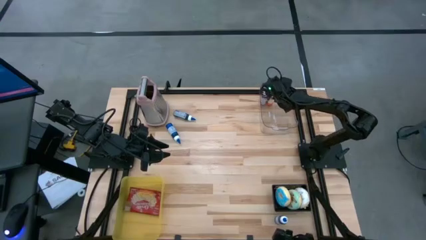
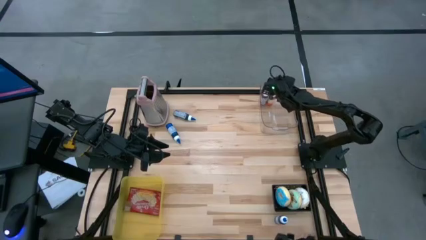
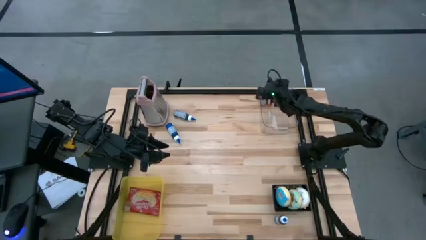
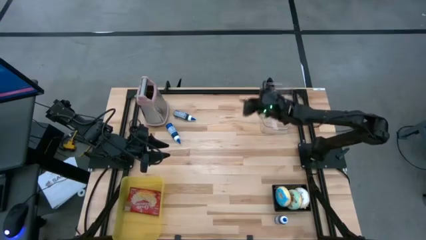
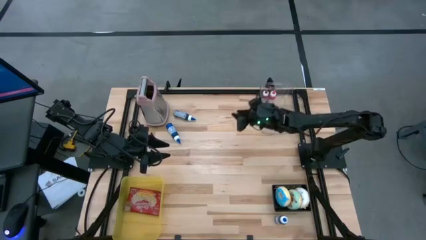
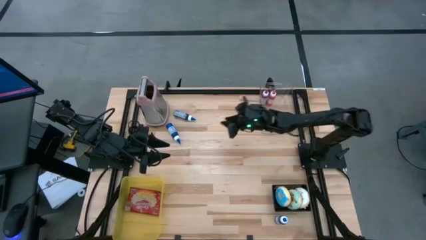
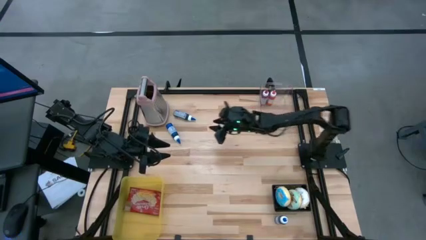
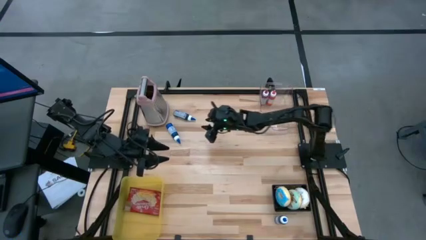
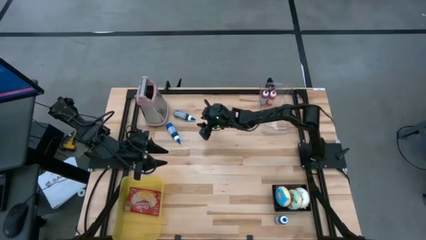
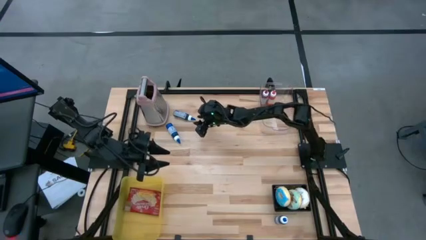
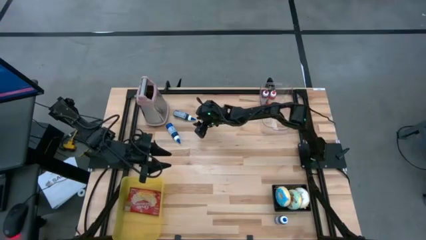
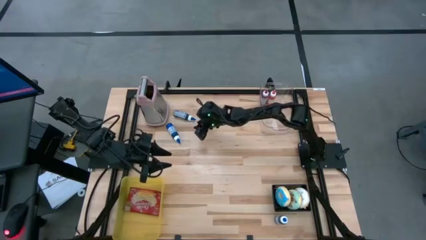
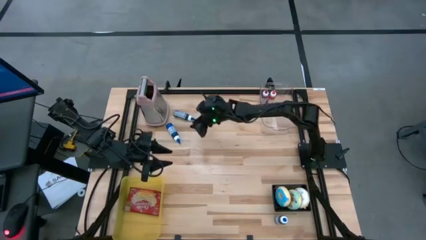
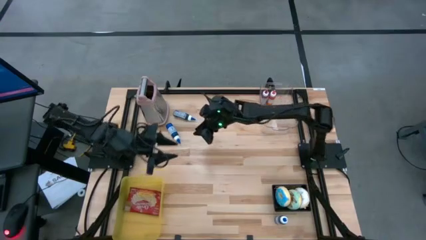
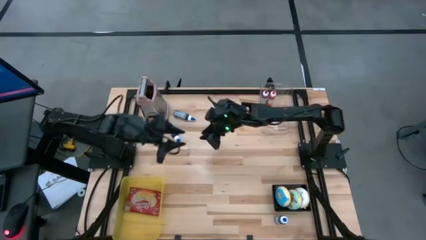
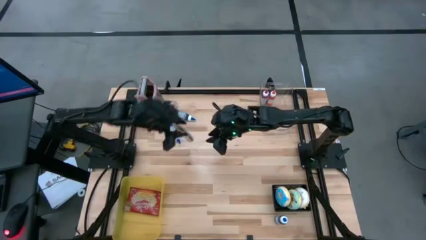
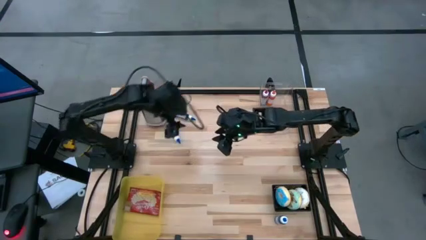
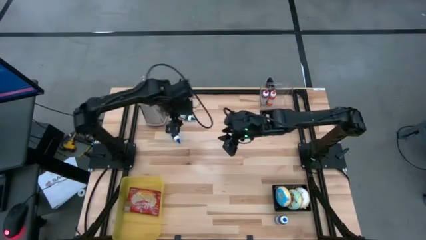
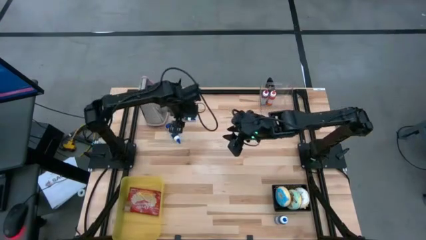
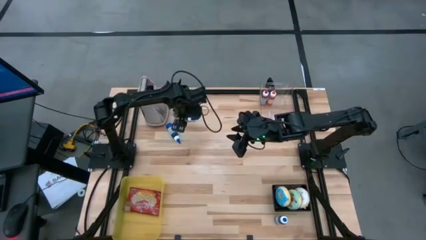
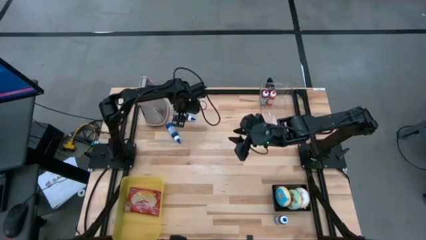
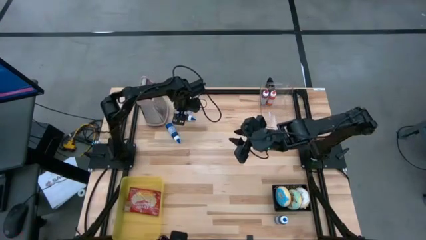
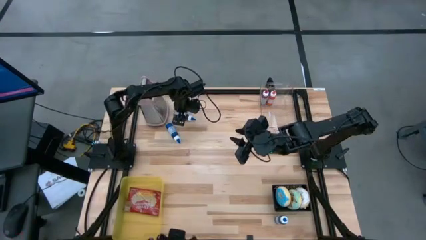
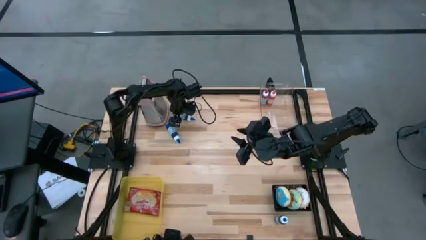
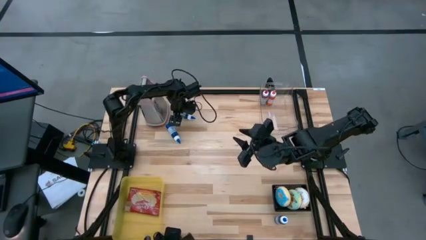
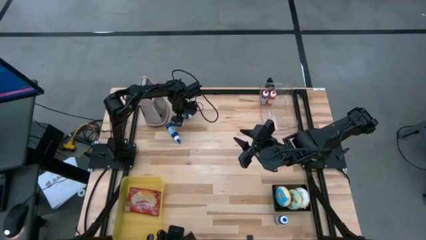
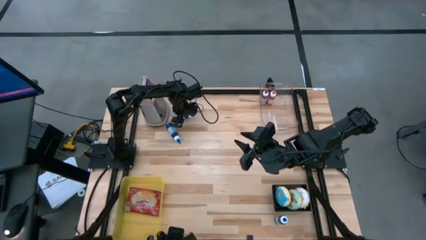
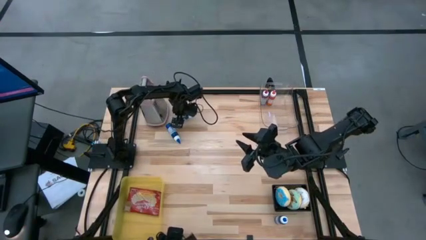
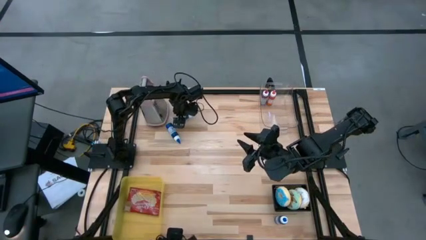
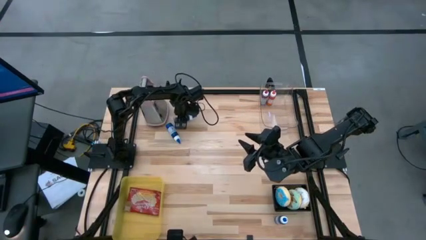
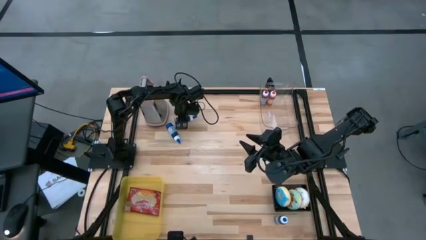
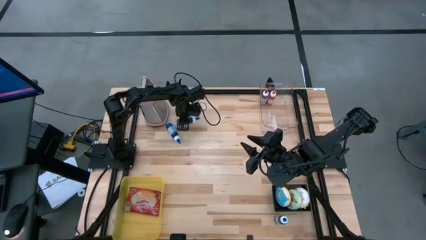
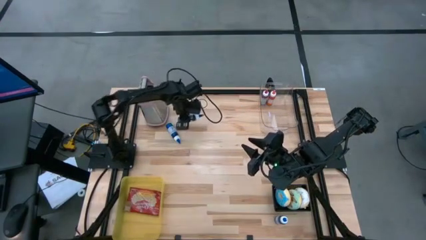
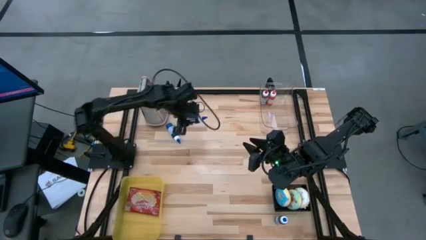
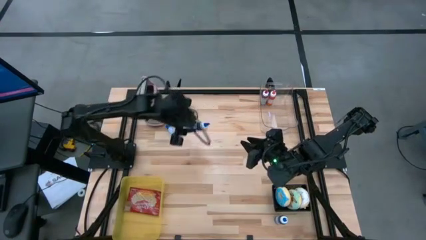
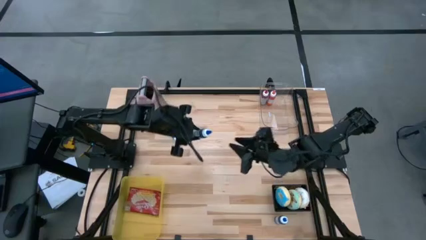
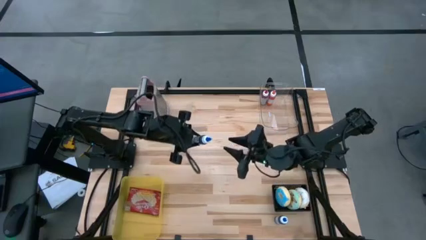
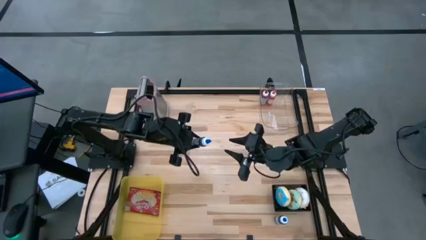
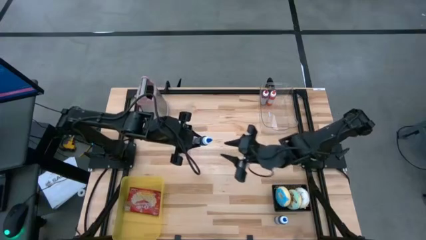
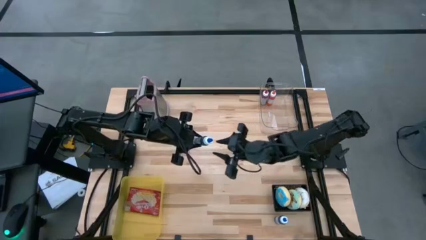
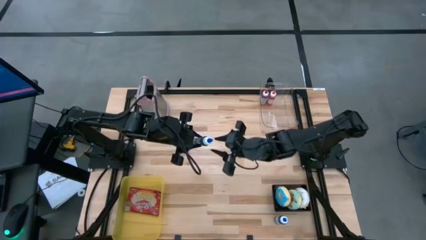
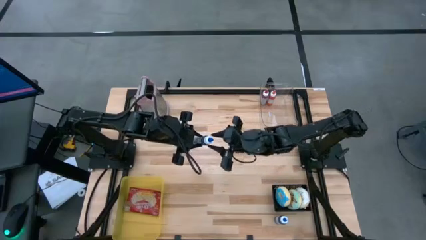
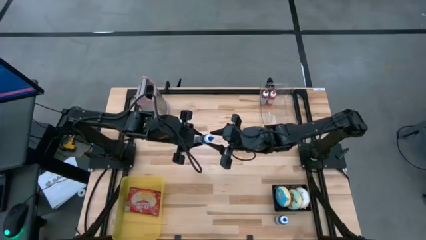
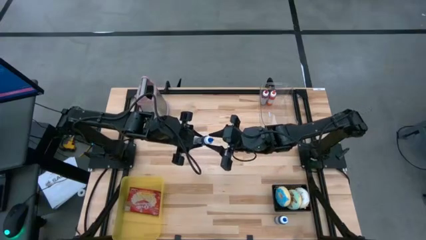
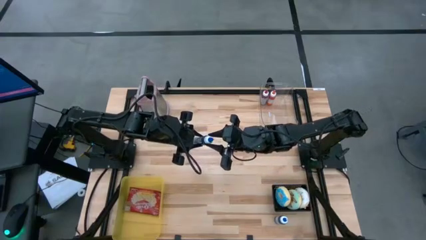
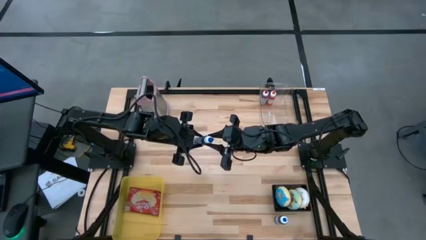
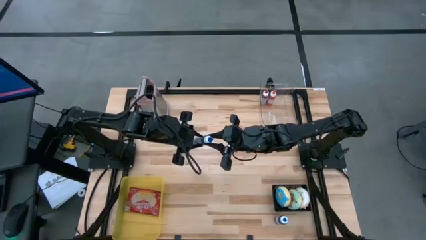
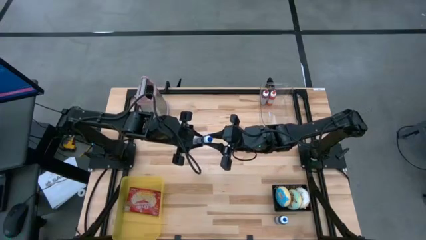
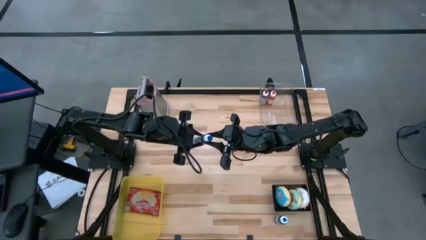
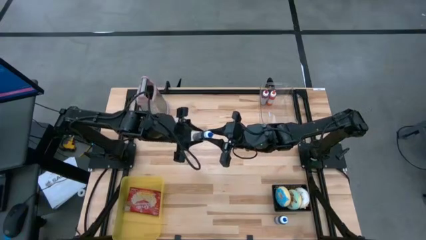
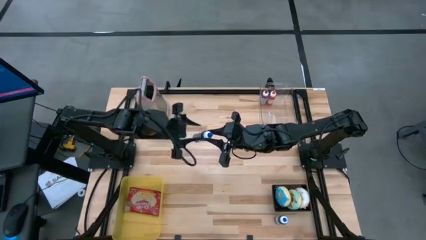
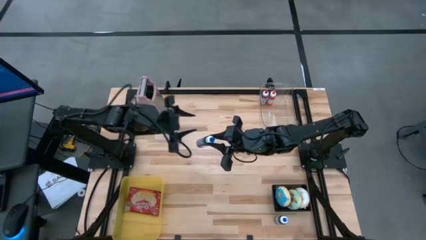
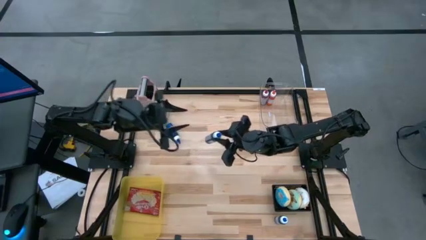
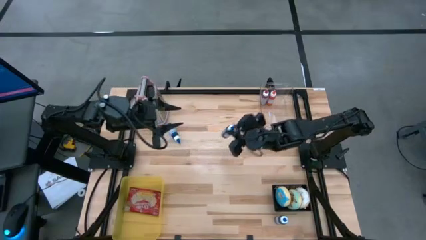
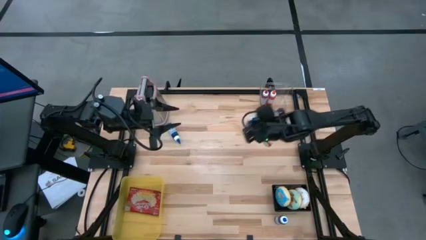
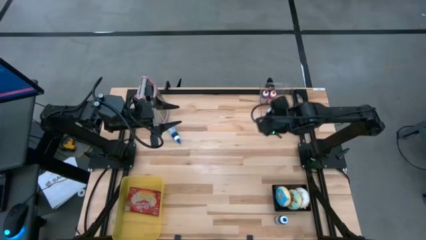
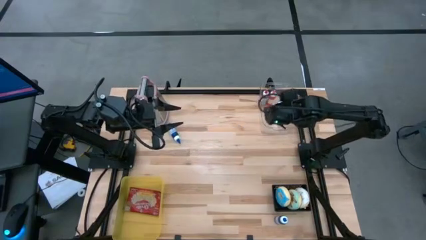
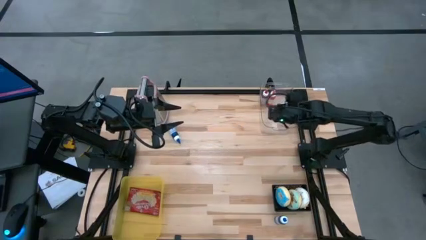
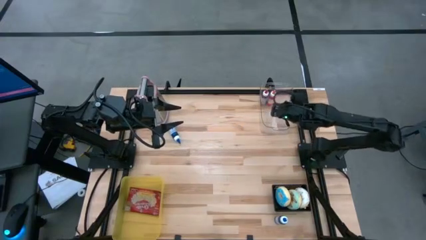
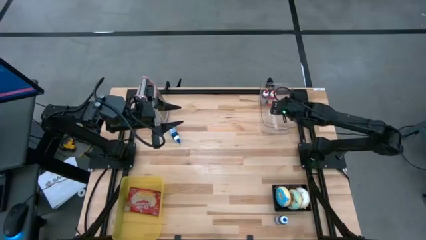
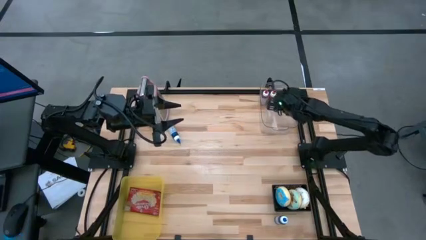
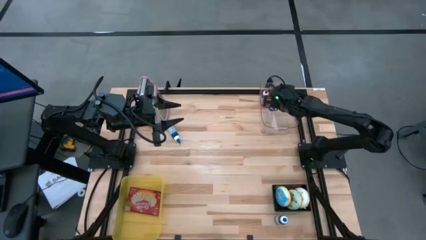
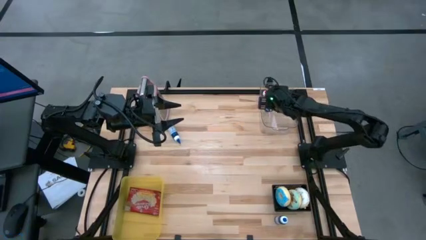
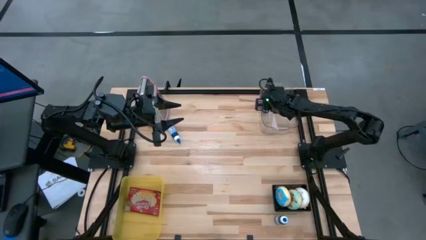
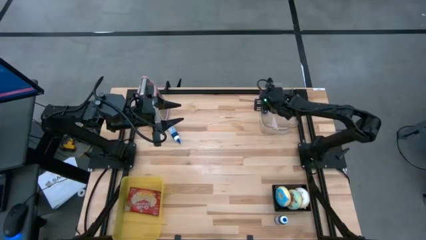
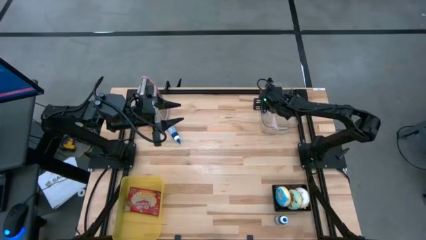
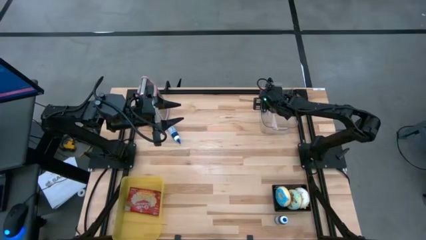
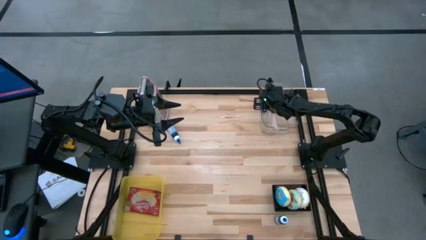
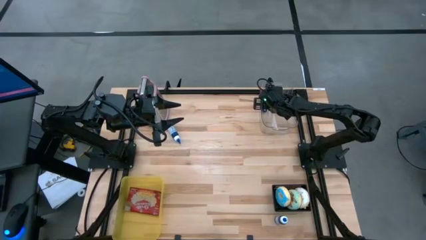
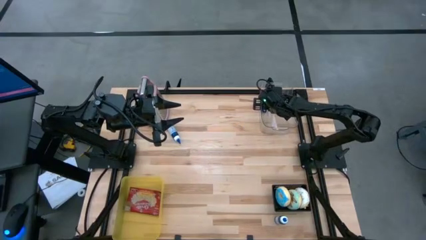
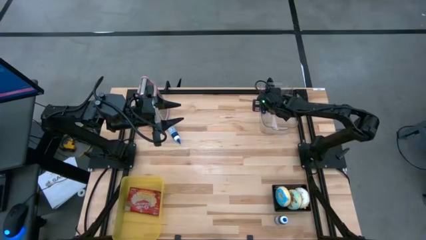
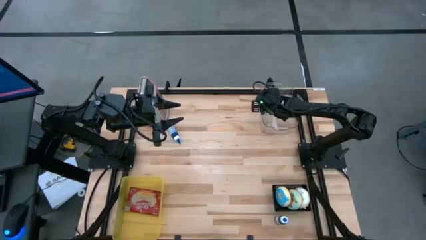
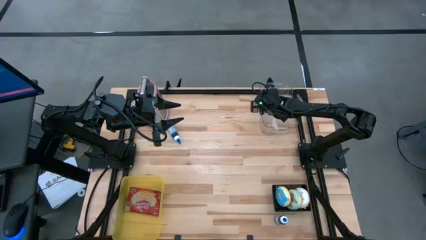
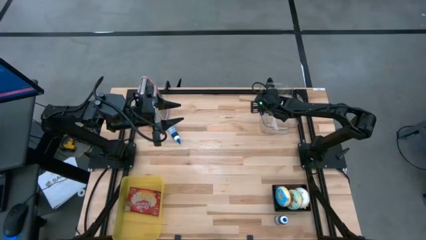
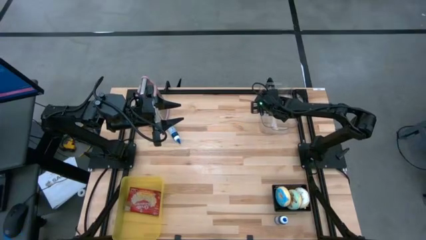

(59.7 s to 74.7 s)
Put the top left blue food coloring bottle into the transparent bin
